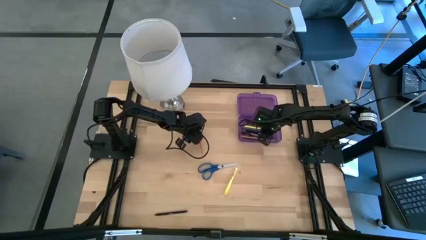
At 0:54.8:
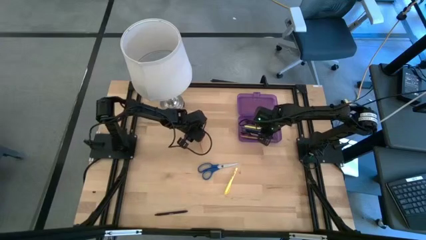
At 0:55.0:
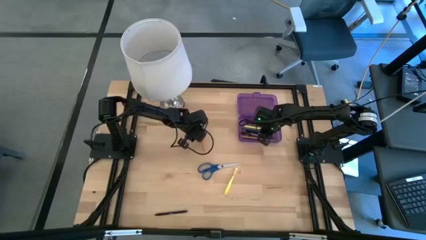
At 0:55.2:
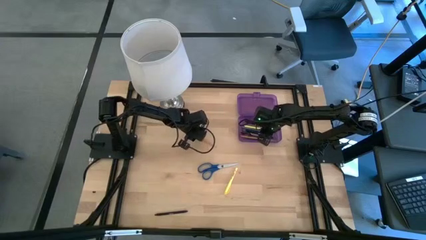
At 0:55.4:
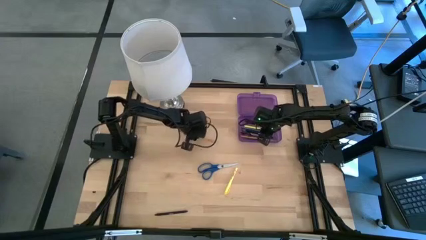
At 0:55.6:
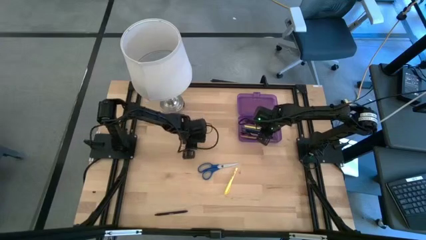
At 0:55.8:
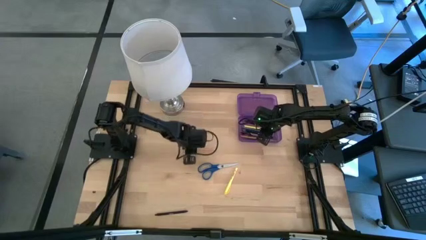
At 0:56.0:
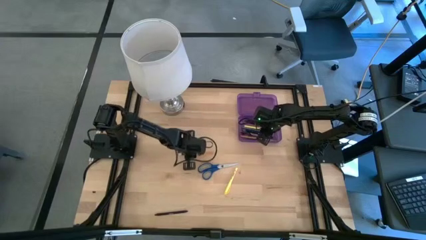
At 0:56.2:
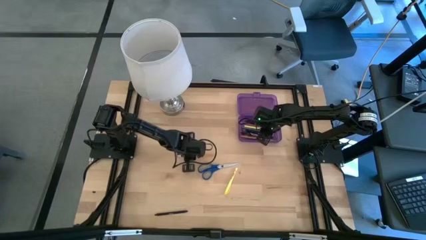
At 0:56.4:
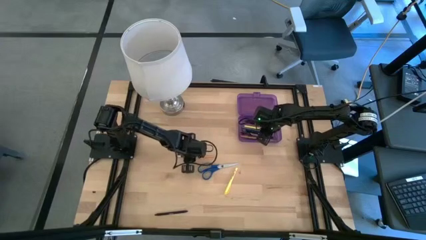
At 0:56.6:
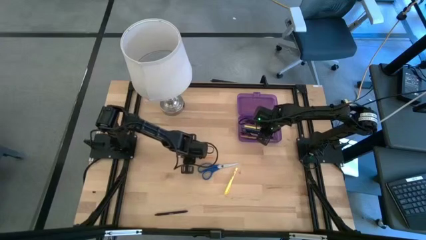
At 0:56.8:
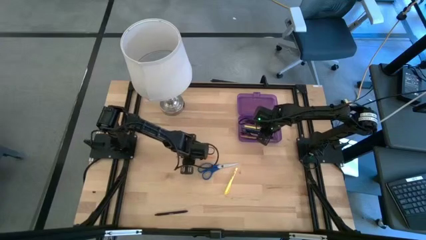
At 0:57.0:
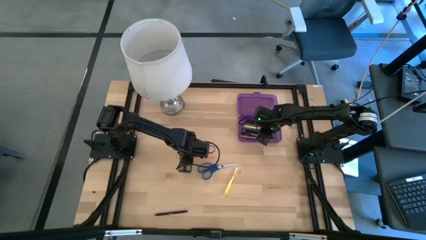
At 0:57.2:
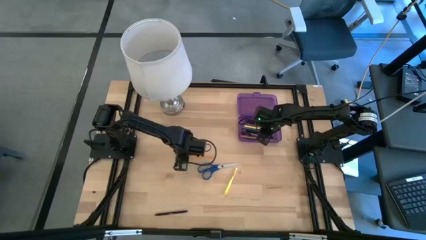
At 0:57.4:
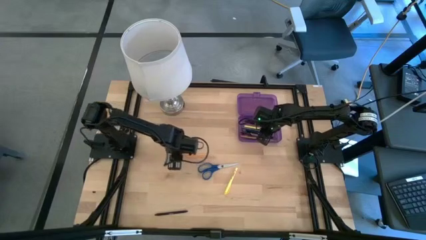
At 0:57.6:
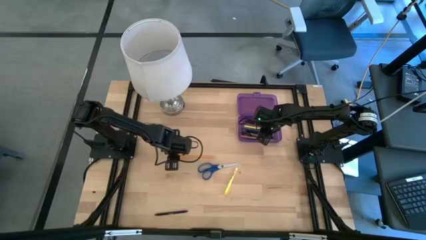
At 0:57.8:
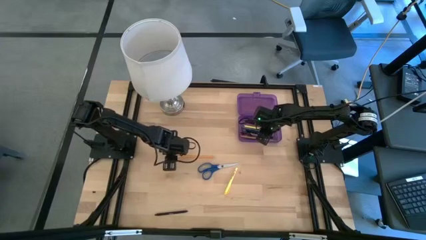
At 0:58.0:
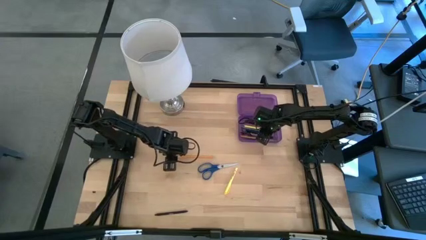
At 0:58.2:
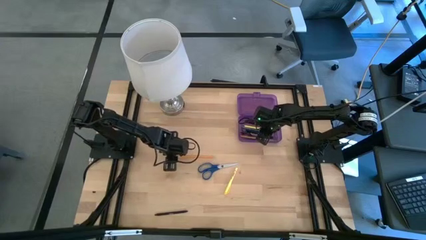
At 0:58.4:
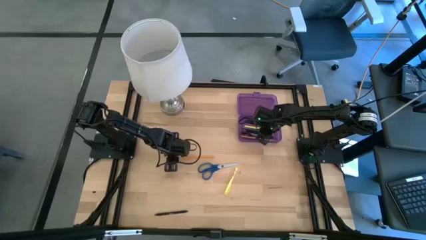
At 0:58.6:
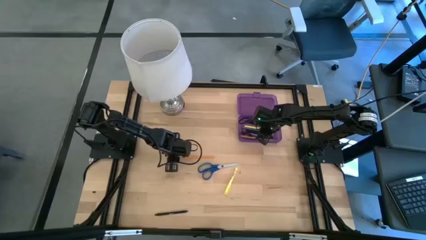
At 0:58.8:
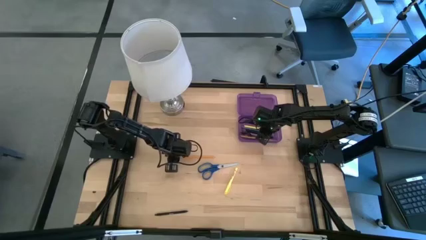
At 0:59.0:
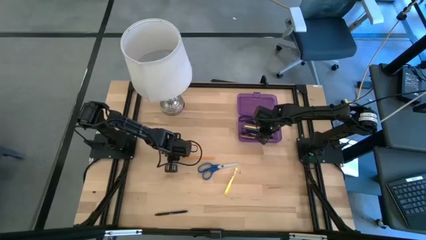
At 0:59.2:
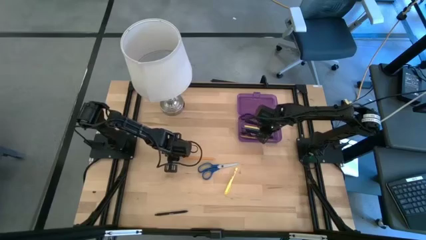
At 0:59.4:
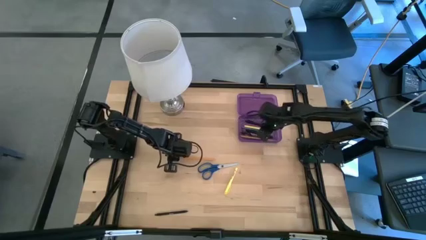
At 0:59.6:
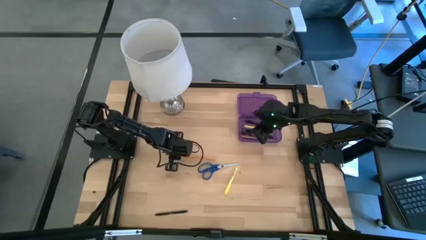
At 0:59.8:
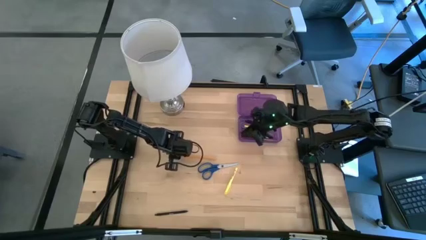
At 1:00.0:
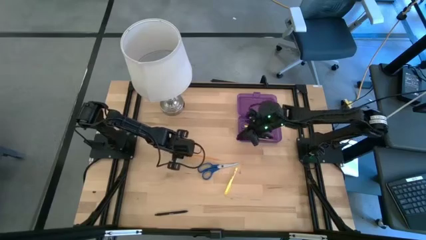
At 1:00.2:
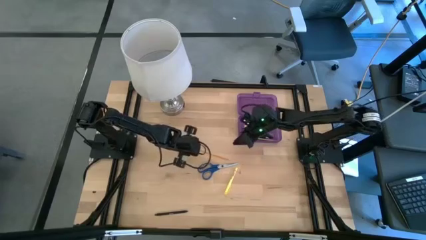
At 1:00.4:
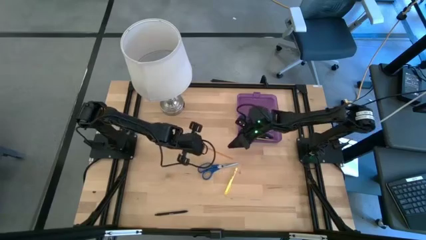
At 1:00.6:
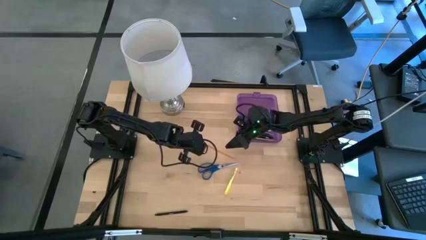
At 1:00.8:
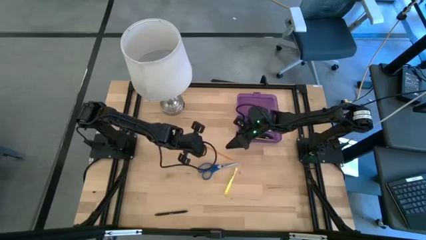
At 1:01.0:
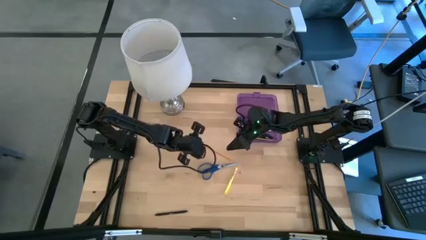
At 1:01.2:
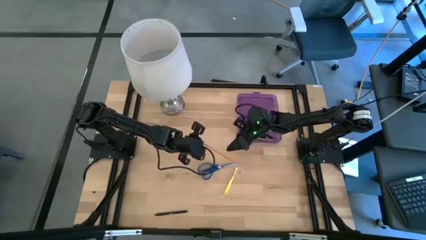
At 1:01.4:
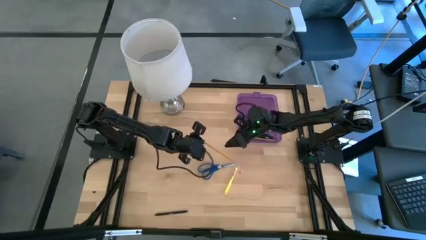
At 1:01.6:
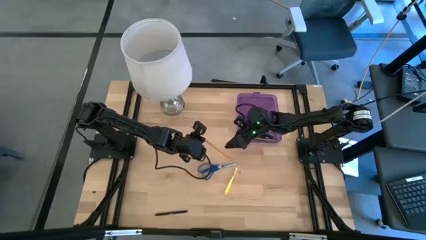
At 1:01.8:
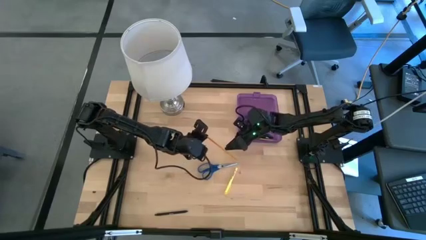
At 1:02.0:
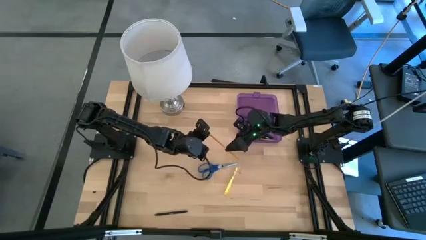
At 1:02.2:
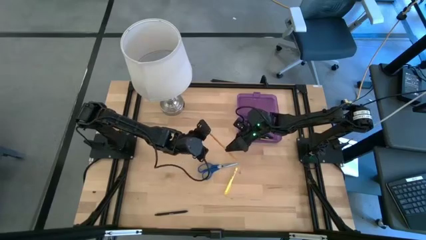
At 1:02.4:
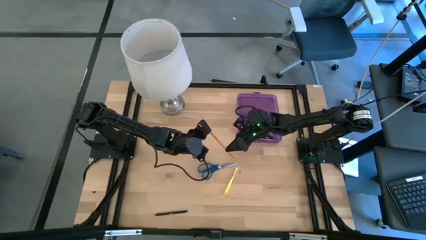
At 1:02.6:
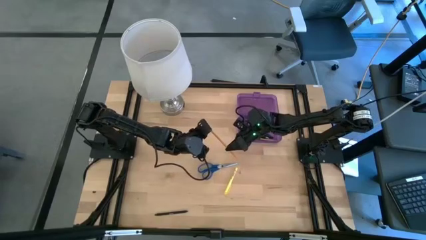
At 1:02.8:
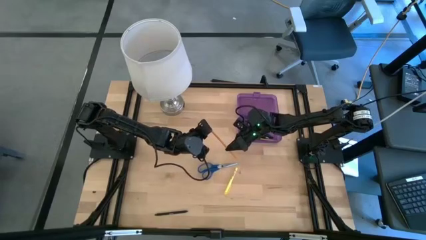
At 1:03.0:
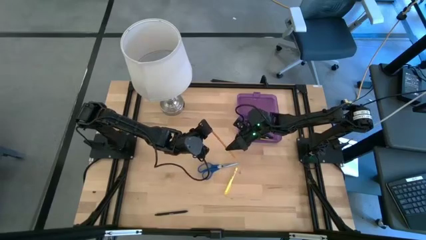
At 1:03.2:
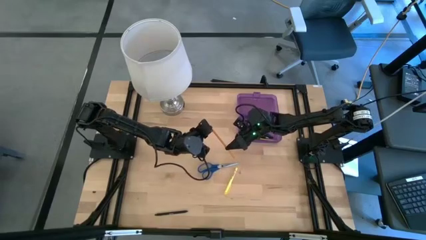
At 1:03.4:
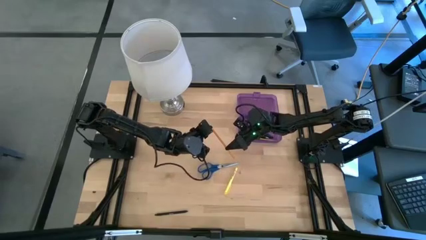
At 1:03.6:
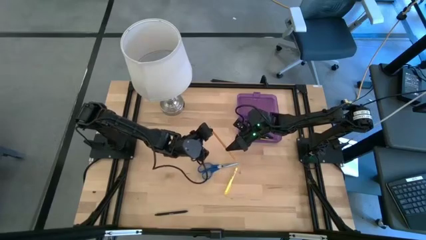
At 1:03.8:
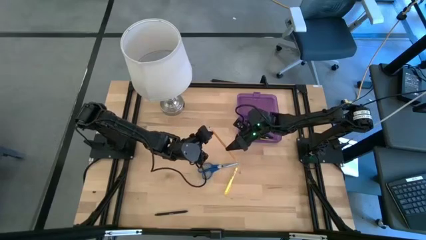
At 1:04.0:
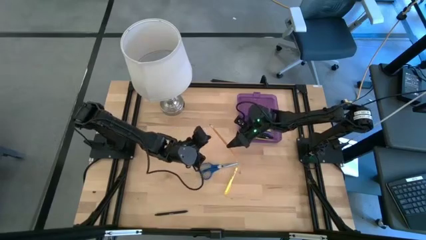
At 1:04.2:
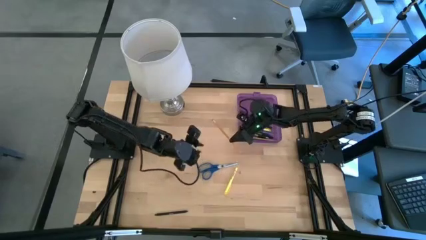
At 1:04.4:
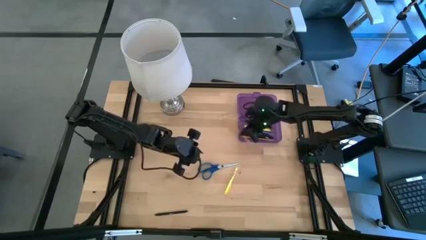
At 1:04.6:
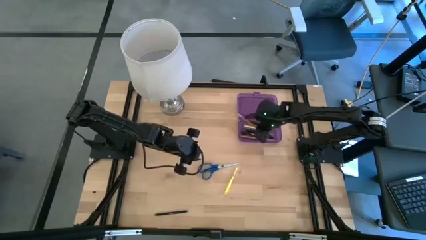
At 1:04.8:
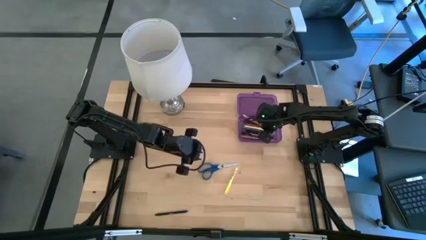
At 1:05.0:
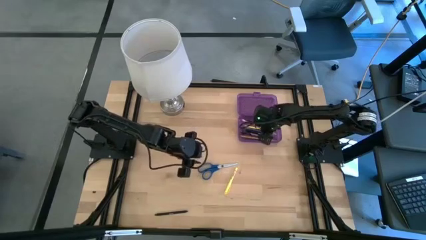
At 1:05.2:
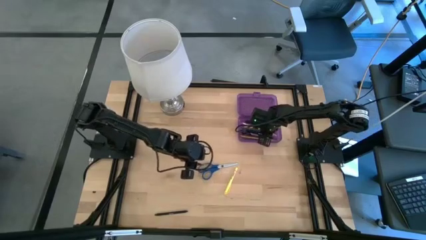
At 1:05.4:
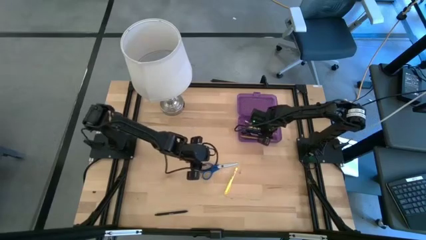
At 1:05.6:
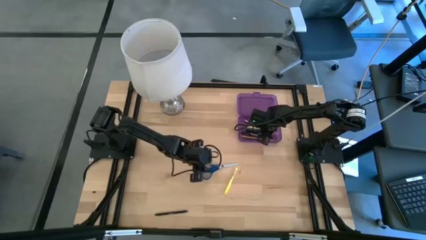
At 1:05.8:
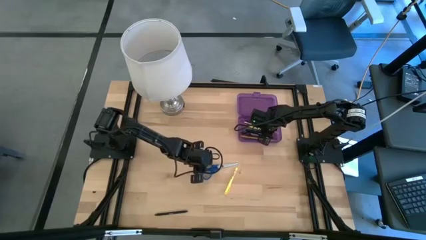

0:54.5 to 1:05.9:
Task: Pick & place school supplies into a supply box
Put the pencil into the purple supply box

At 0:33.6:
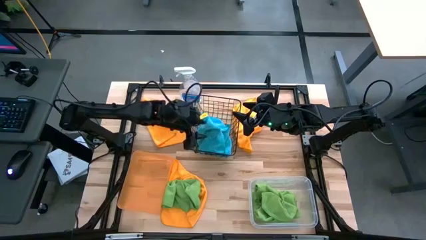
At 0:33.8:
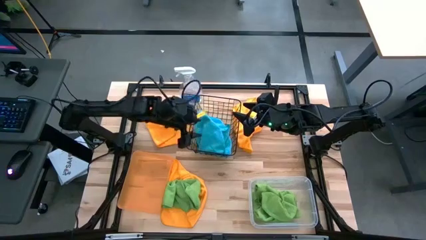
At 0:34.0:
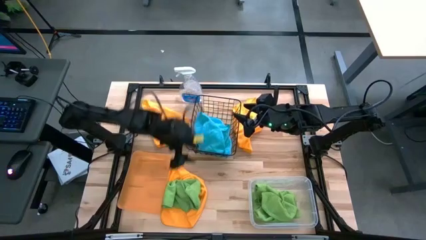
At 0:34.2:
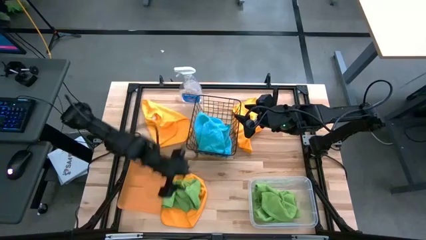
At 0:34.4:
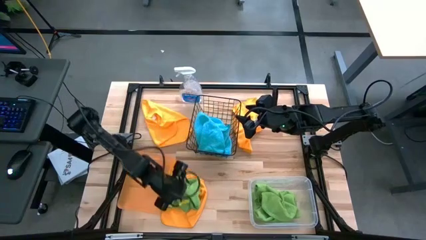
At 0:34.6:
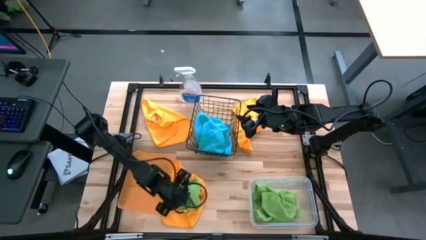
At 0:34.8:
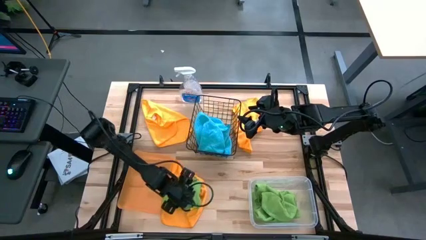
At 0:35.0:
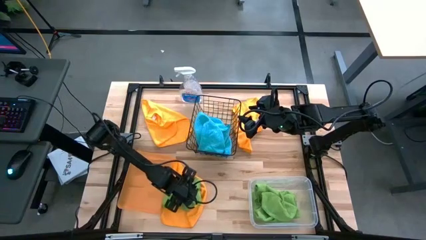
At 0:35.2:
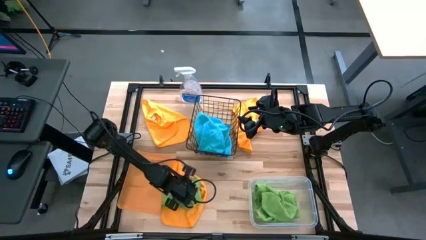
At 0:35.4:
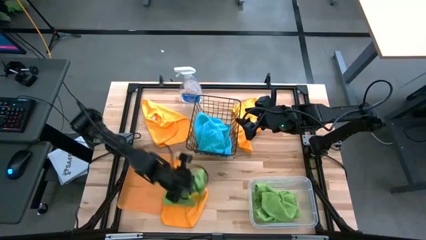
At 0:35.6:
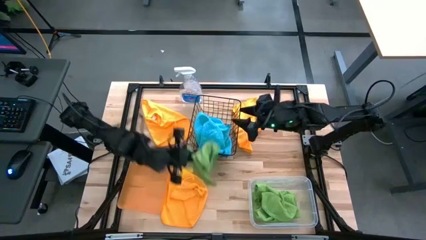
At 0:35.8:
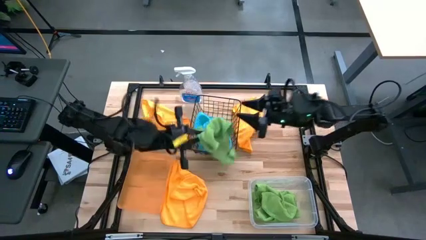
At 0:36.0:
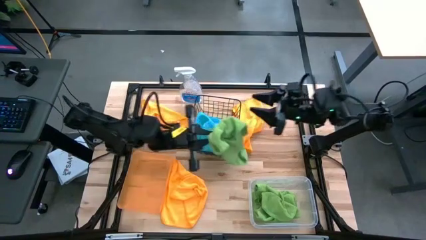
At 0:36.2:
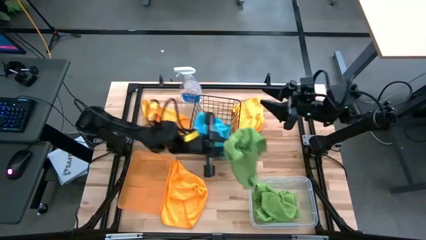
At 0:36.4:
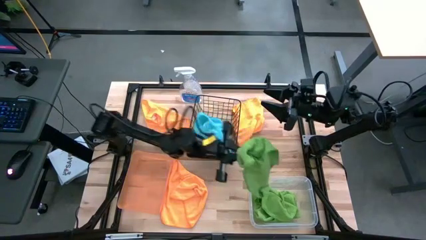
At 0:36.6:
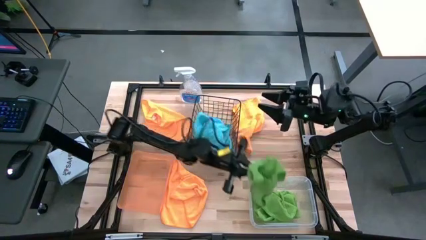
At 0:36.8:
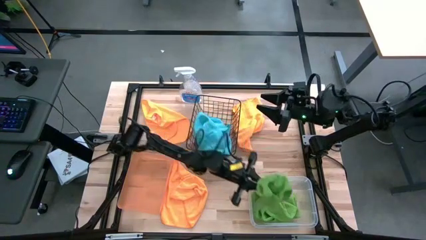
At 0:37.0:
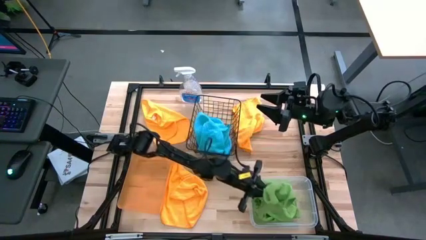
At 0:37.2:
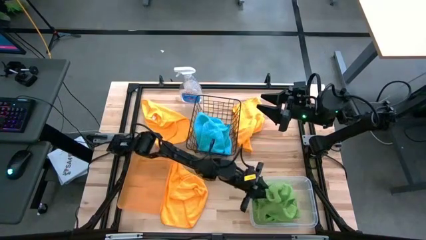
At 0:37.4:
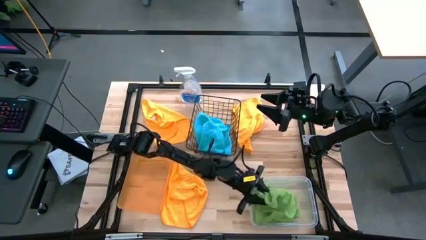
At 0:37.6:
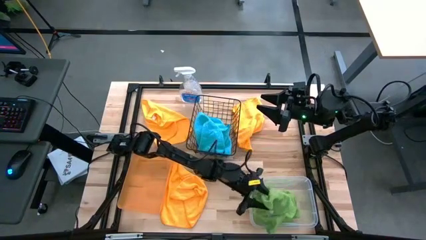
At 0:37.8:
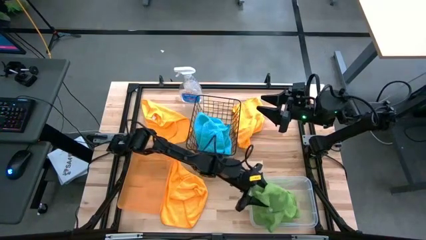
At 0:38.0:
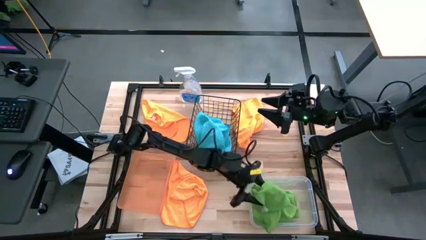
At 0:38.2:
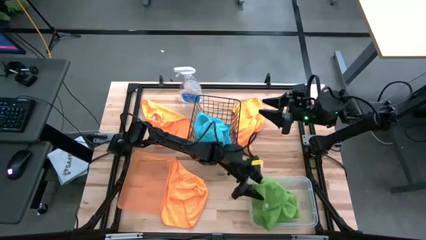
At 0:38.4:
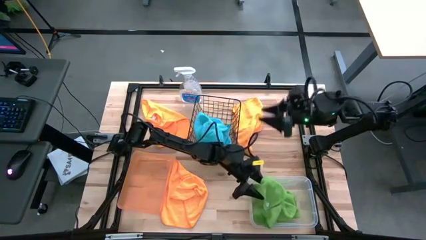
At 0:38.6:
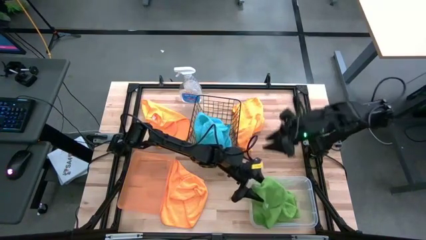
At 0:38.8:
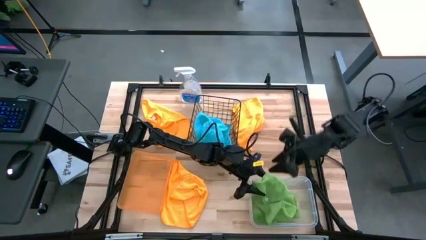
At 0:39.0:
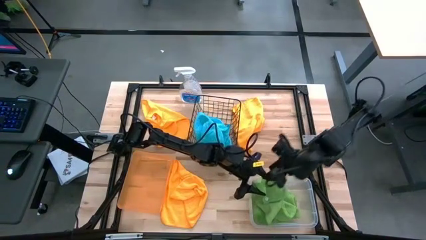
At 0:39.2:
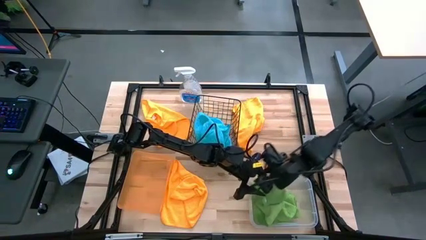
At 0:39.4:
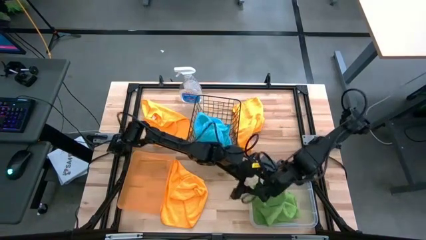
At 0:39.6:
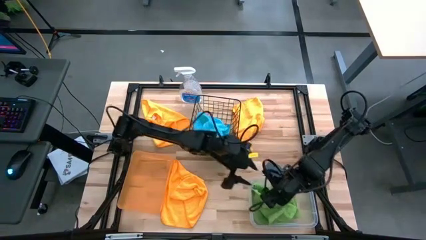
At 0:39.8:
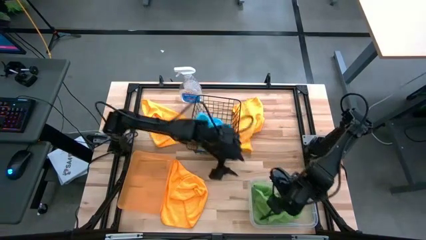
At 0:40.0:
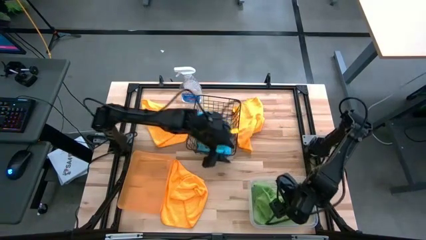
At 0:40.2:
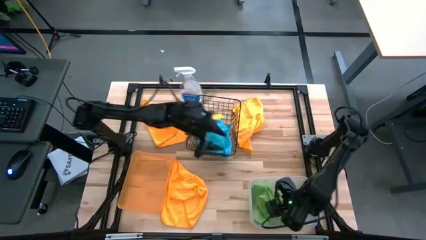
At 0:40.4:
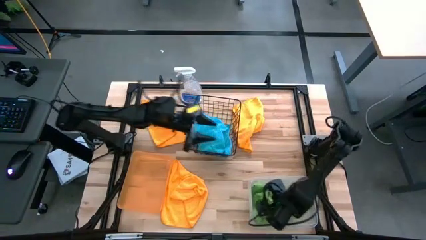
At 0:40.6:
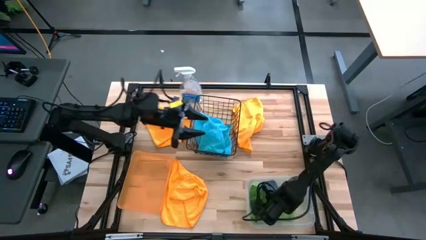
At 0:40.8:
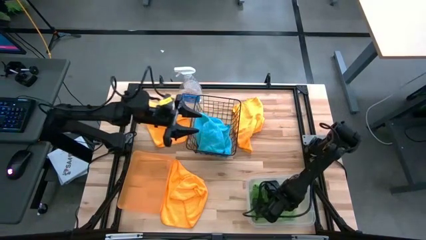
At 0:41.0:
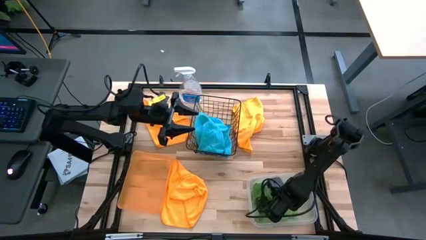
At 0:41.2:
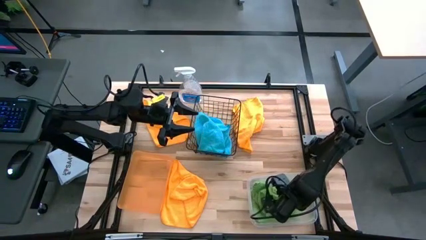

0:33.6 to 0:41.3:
Task: Sort microfiber towel by color & place in baskets
Put the green microfiber towel into the transparent bin
